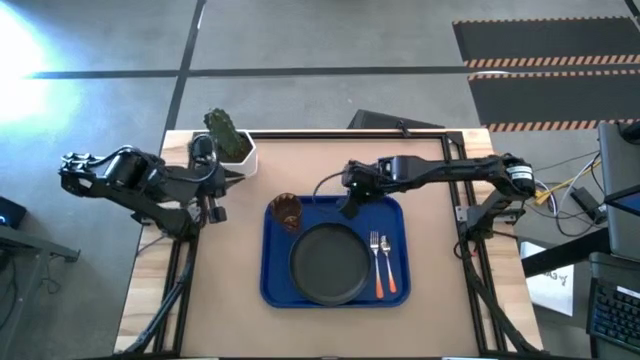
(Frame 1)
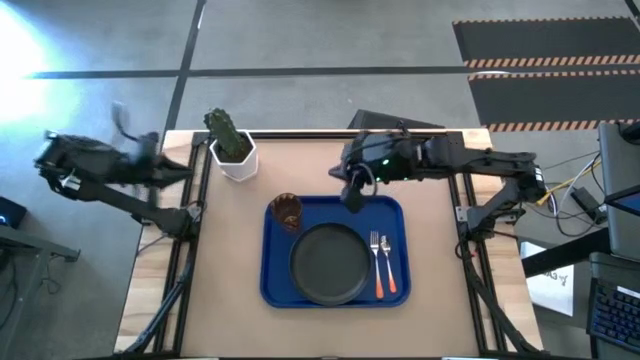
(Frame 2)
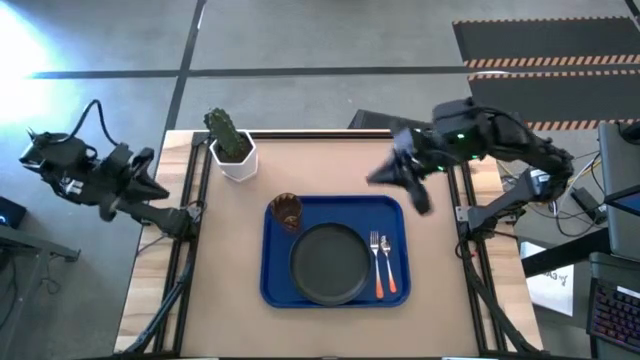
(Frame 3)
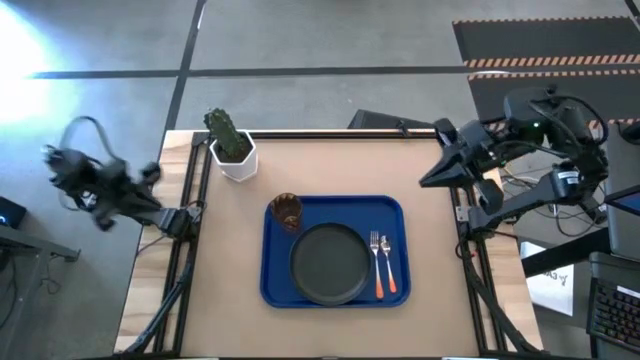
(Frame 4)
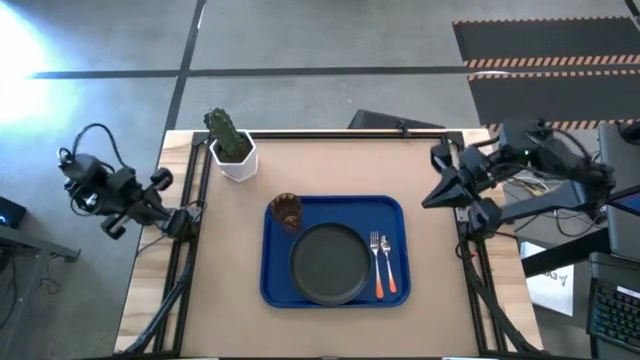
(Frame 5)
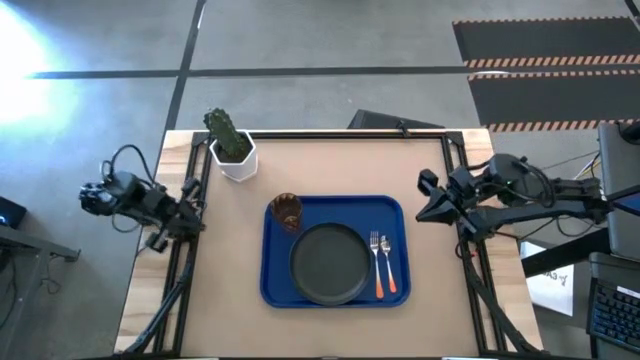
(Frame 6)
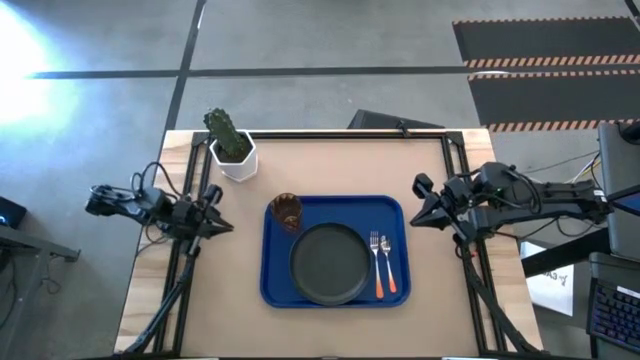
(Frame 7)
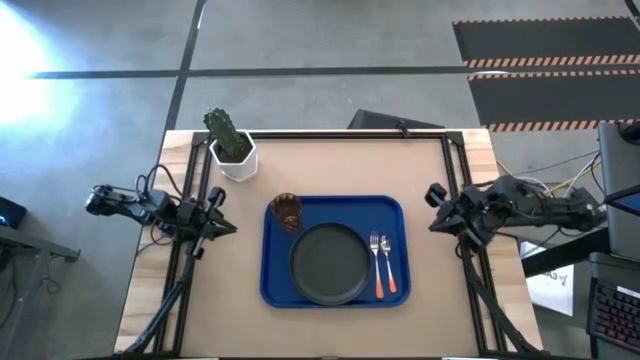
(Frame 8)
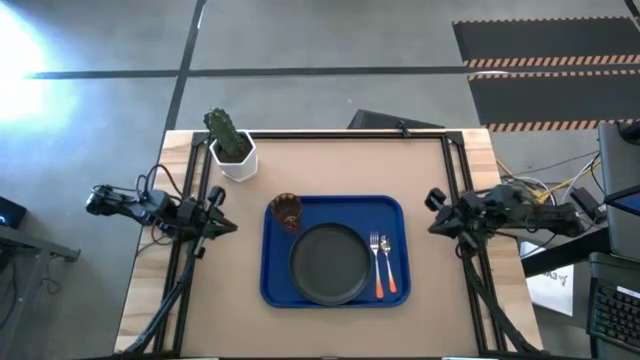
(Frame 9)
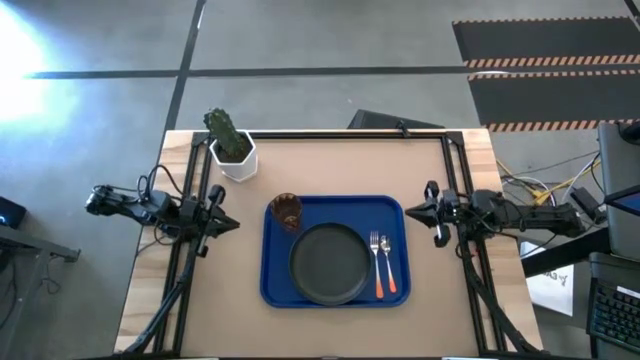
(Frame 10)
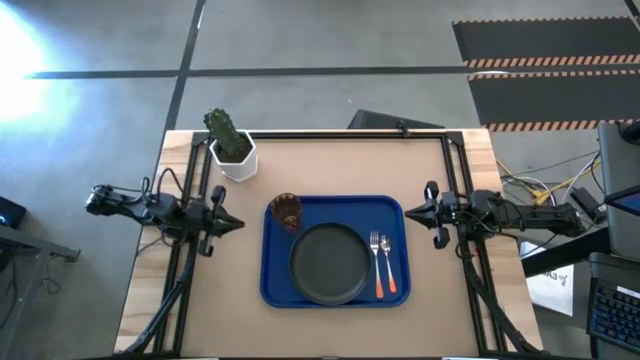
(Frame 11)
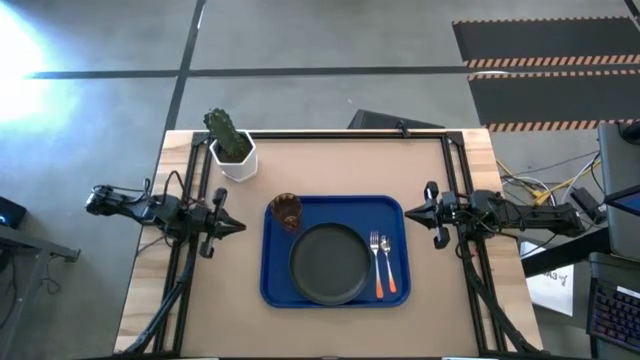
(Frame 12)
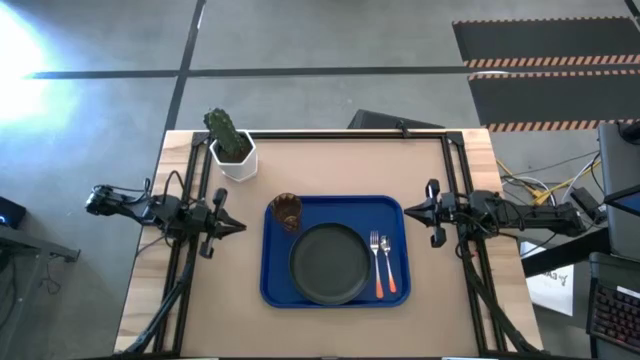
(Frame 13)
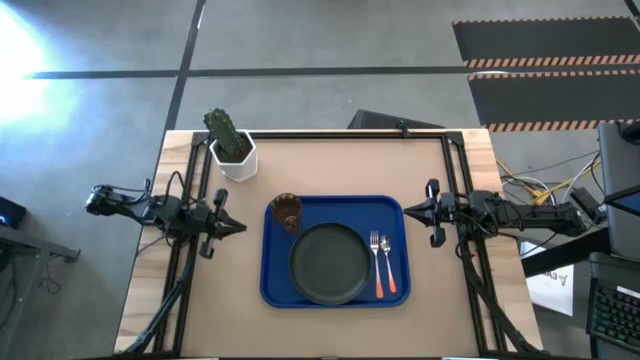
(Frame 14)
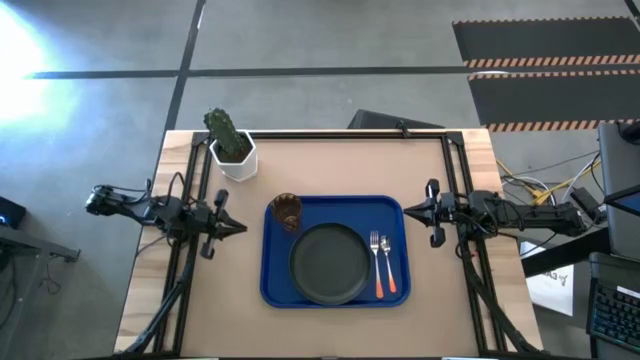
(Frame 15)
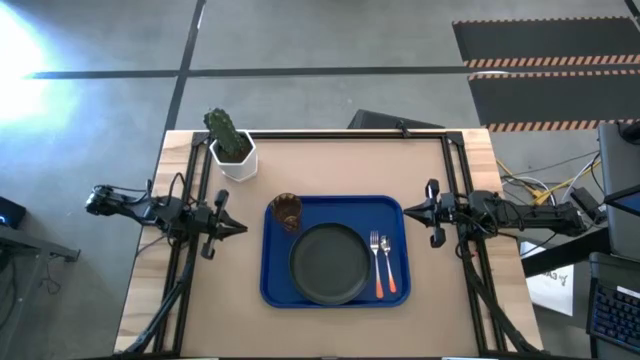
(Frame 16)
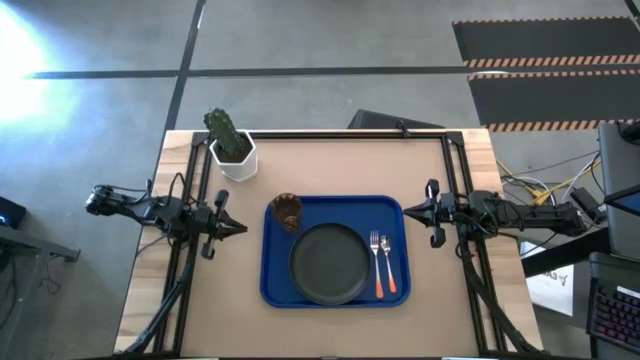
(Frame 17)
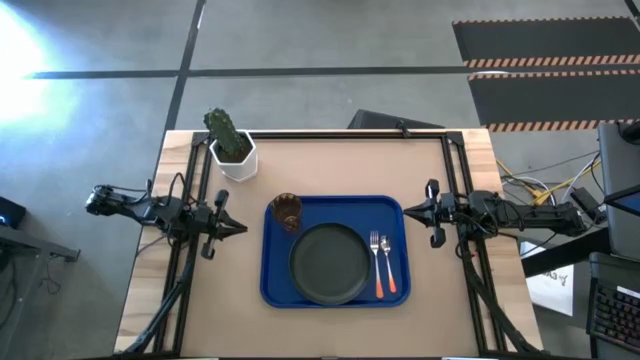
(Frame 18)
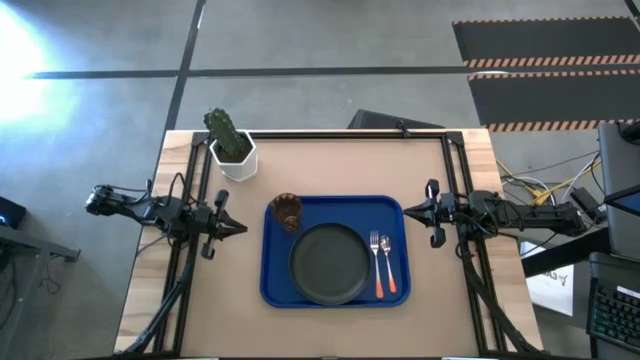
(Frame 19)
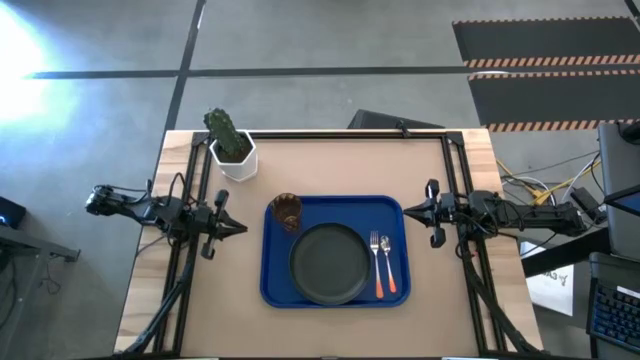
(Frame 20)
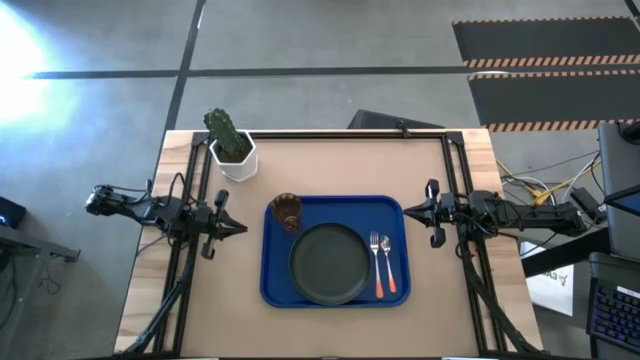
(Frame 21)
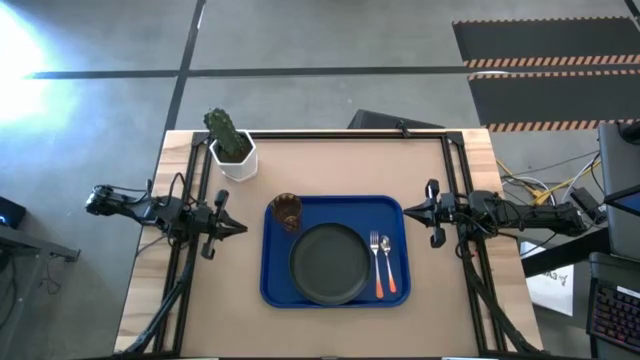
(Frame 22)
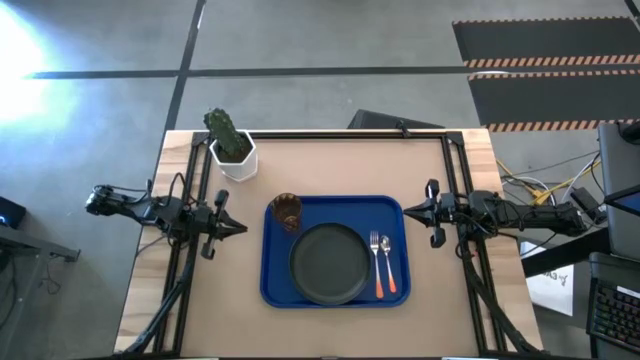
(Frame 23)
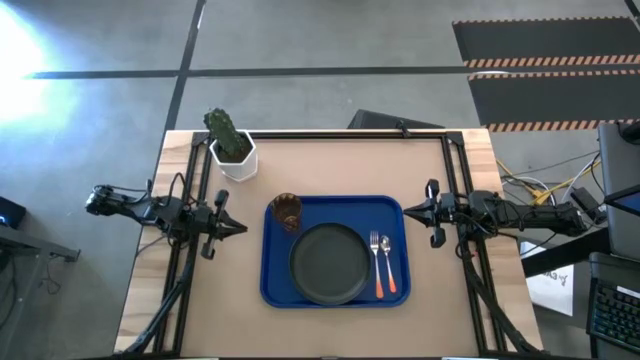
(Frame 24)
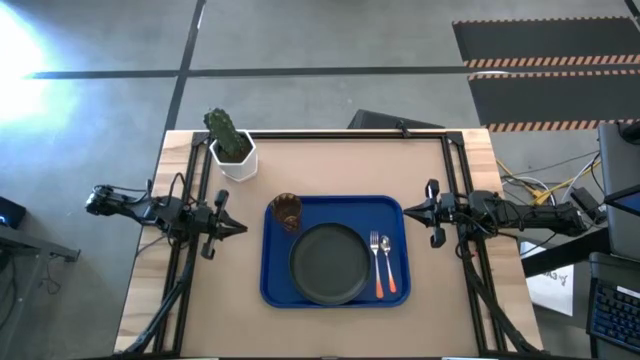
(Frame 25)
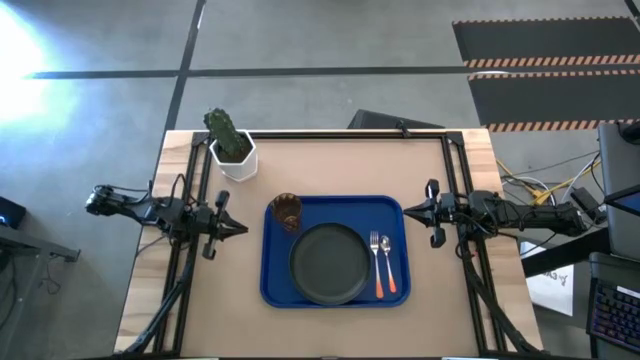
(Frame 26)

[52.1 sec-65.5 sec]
Task: Pick and place plate/cup/fork/spoon on tray
Return to Home Position

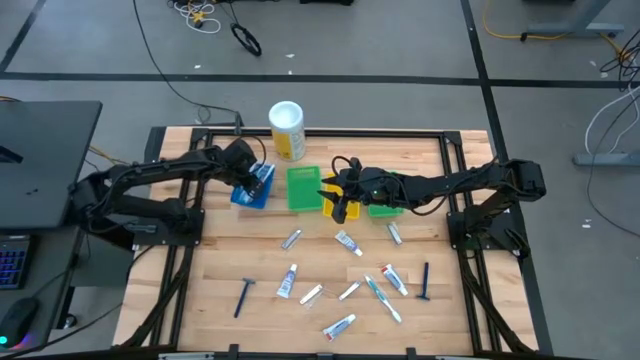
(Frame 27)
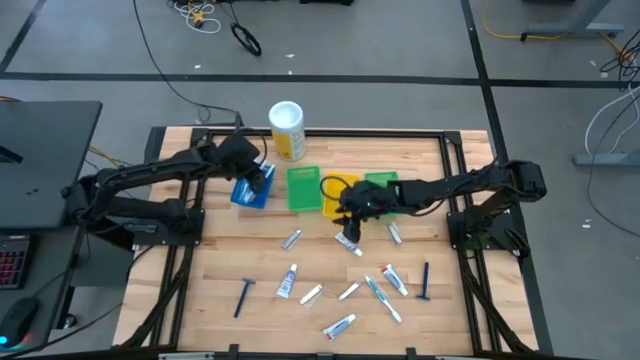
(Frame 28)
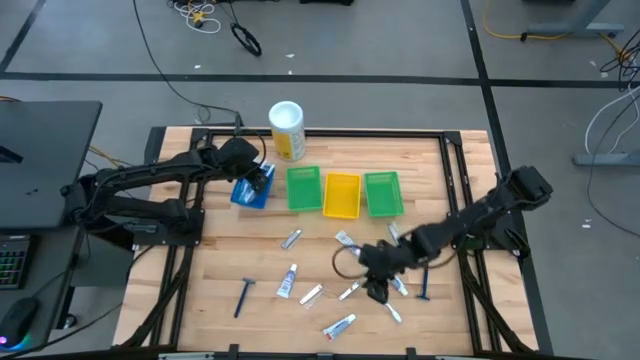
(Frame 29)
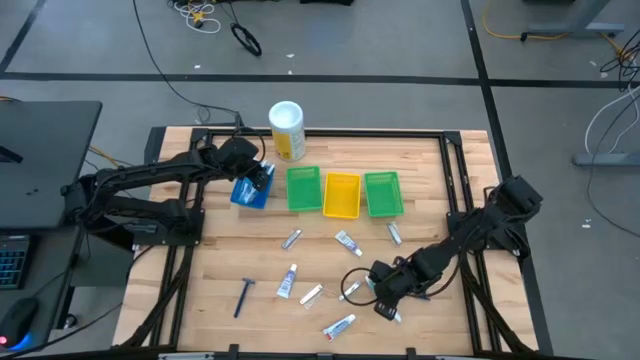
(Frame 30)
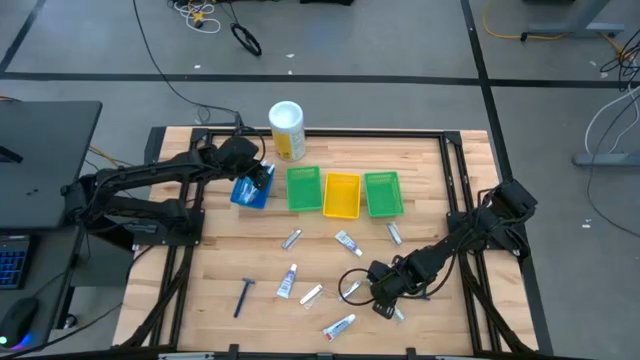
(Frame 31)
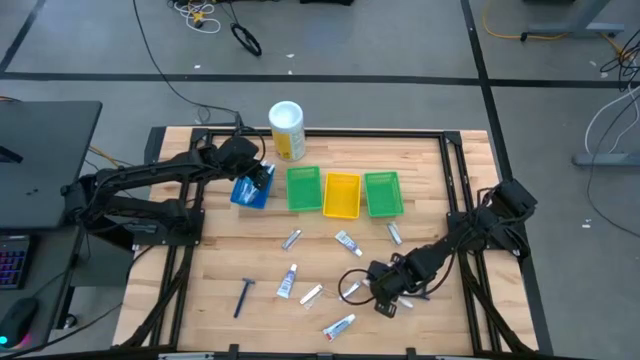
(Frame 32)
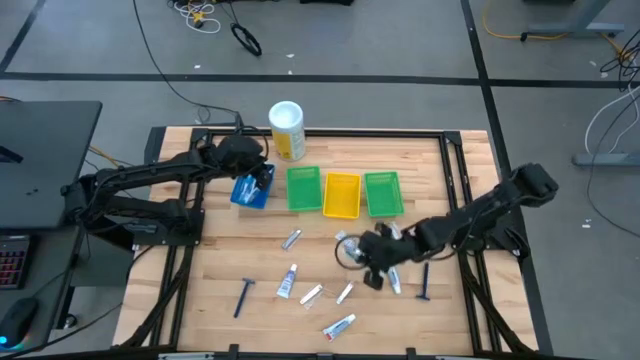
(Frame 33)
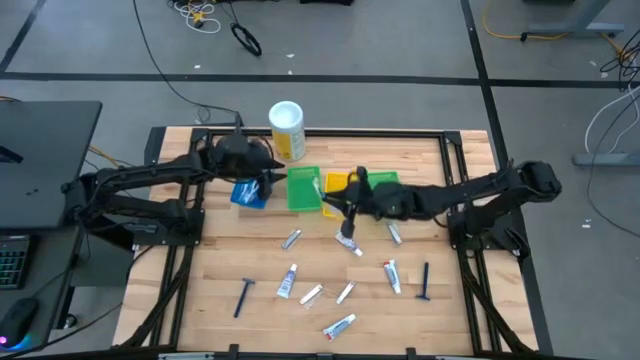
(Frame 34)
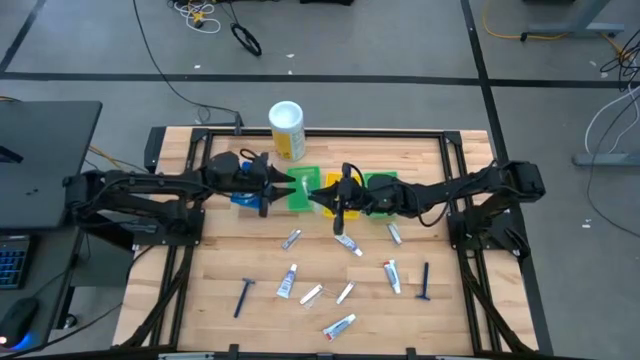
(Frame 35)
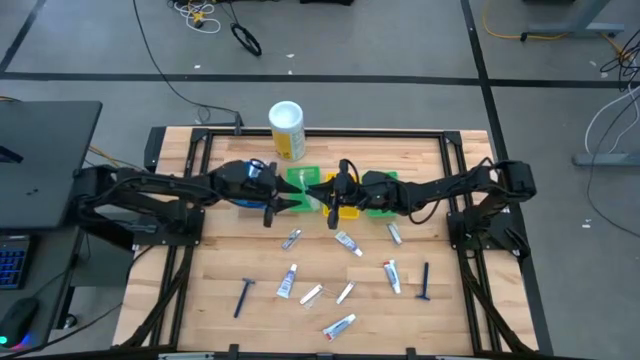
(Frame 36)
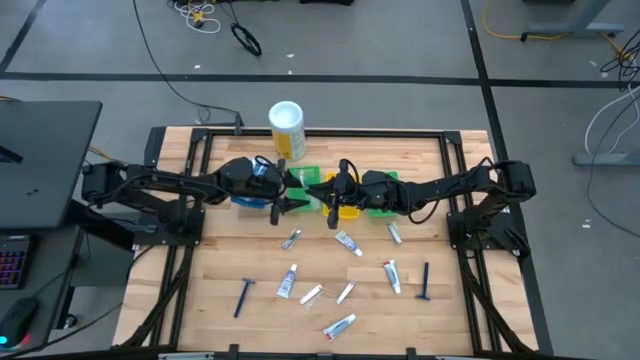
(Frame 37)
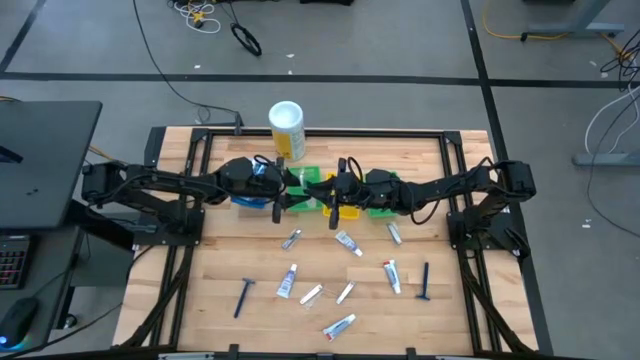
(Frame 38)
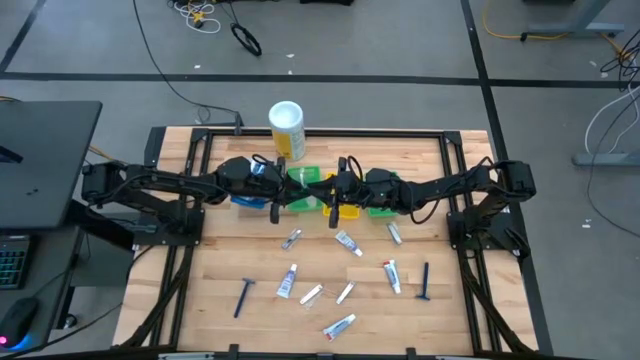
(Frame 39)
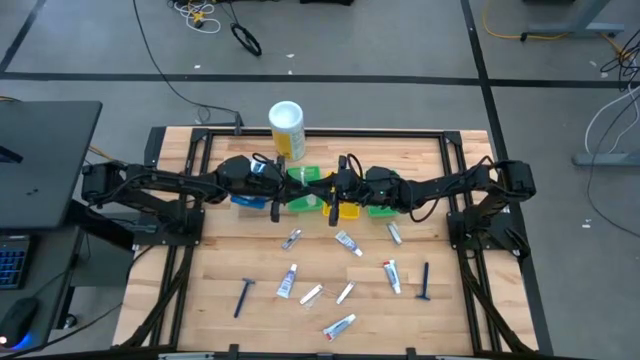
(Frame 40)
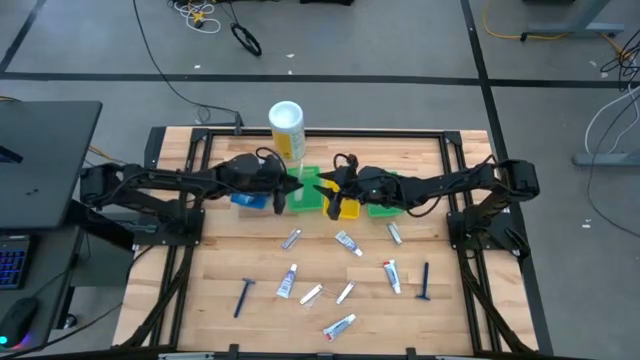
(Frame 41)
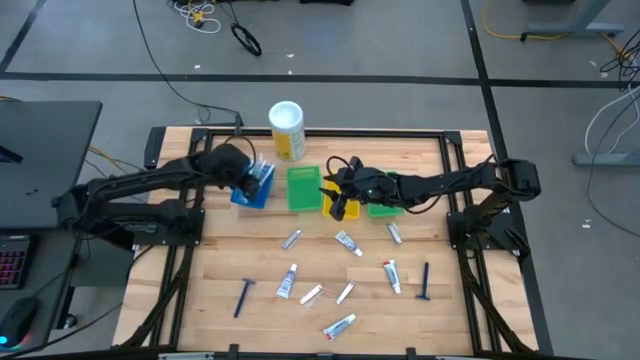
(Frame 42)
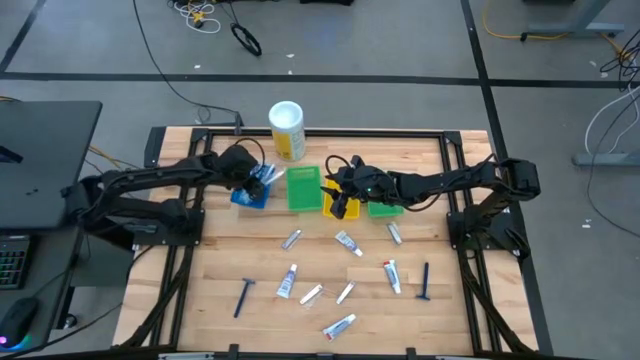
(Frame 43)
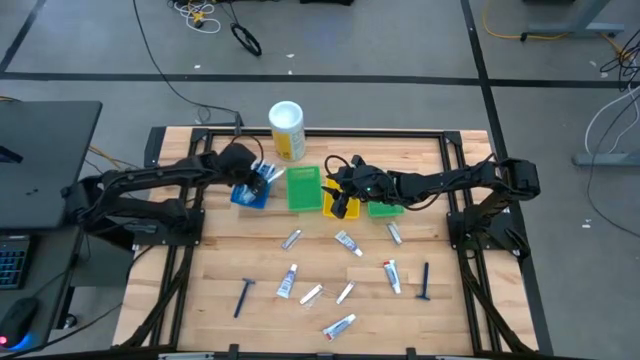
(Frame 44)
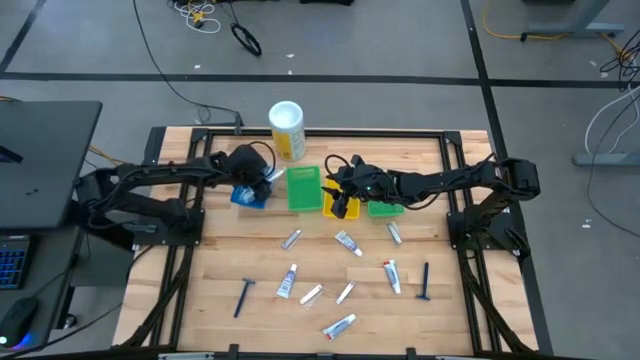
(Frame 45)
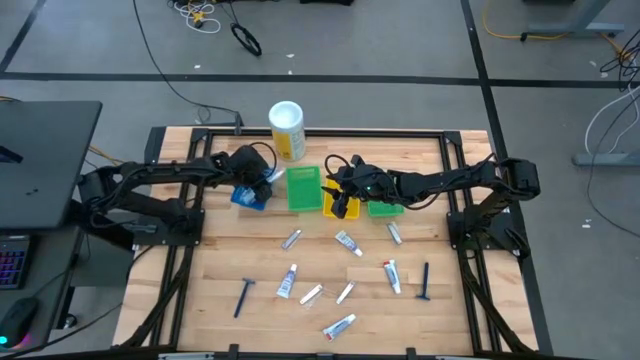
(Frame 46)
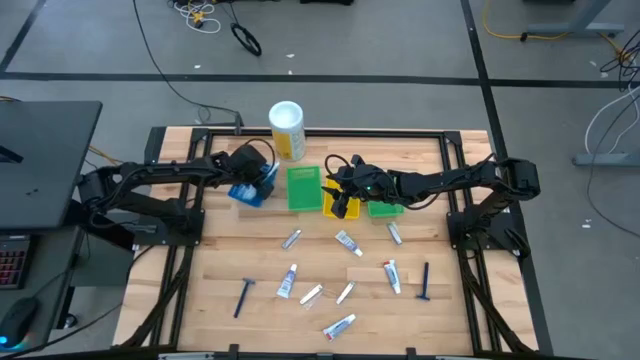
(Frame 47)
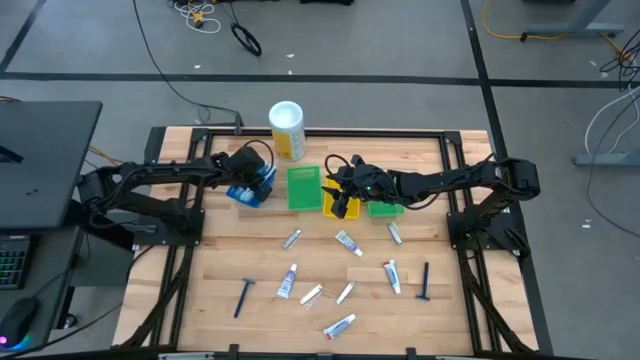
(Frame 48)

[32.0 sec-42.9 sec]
Task: Pick & Place Travel size toiletries
Put the blue toothbrush into the blue bin
